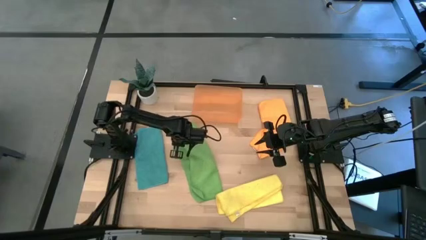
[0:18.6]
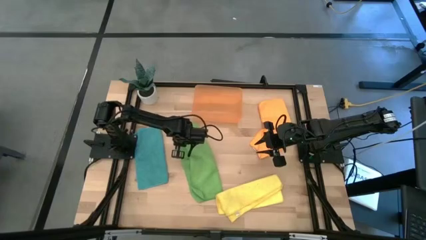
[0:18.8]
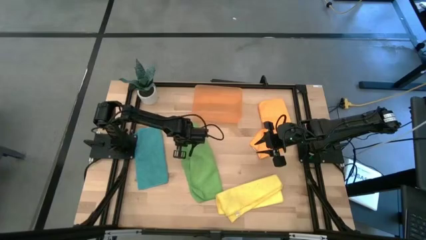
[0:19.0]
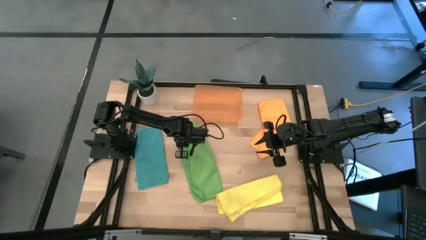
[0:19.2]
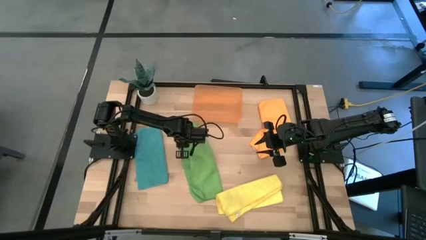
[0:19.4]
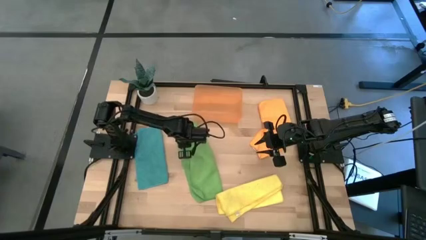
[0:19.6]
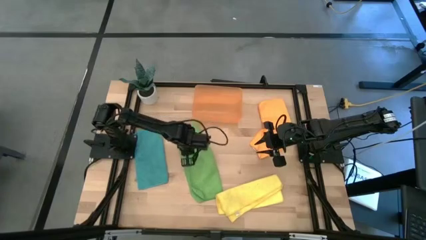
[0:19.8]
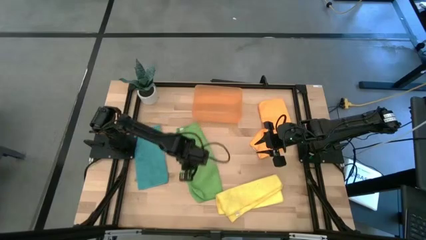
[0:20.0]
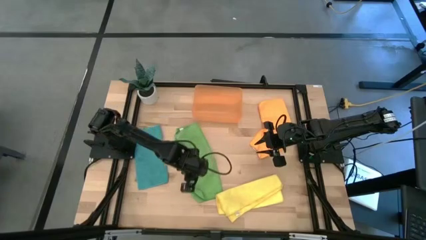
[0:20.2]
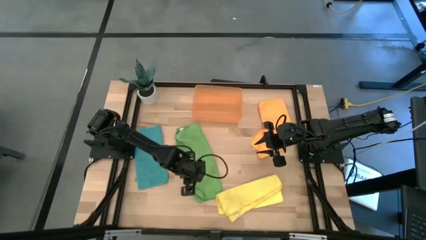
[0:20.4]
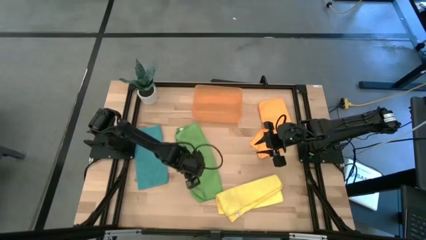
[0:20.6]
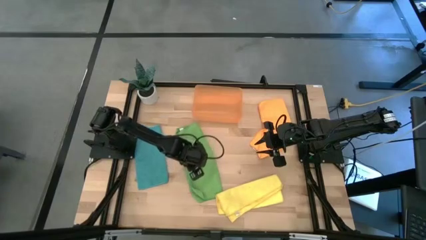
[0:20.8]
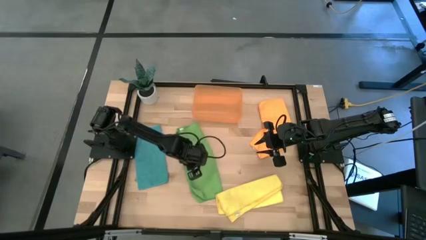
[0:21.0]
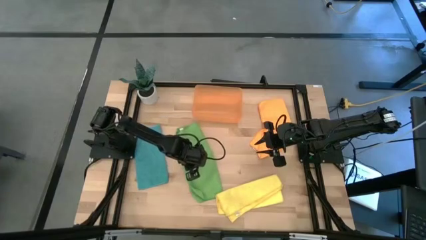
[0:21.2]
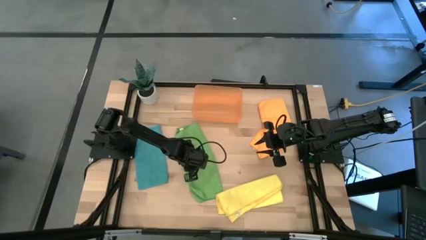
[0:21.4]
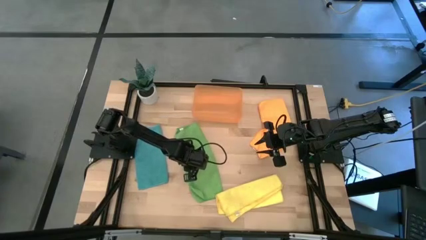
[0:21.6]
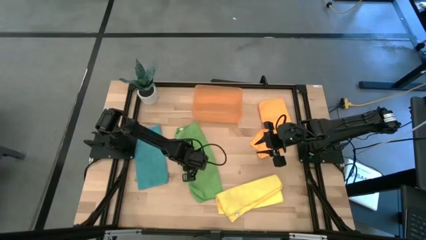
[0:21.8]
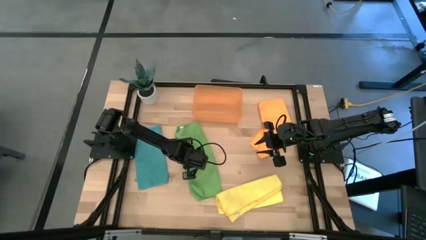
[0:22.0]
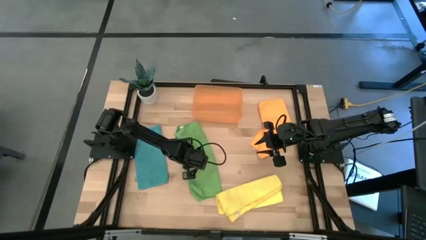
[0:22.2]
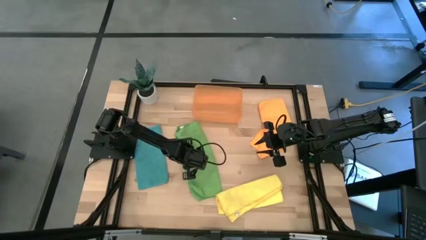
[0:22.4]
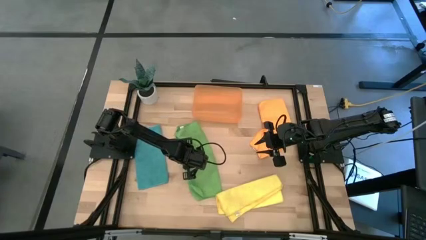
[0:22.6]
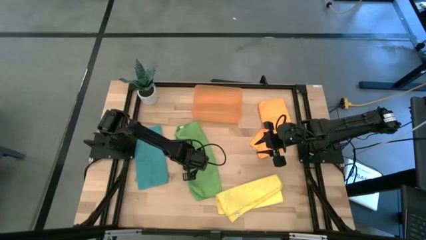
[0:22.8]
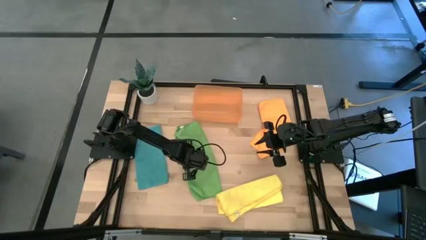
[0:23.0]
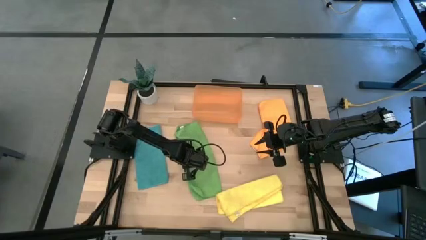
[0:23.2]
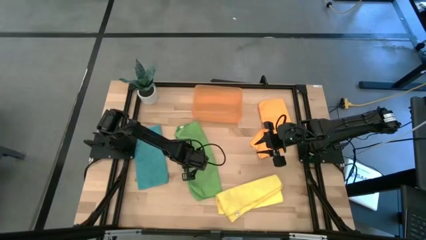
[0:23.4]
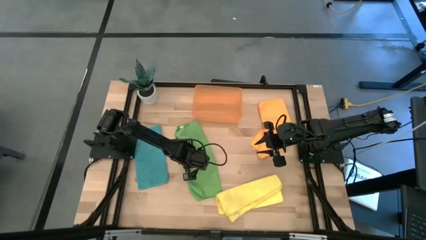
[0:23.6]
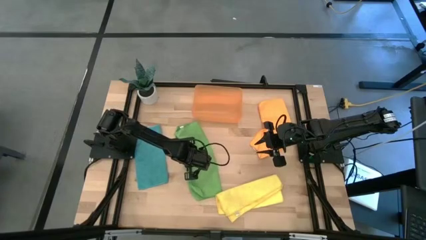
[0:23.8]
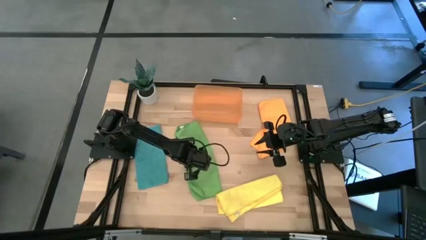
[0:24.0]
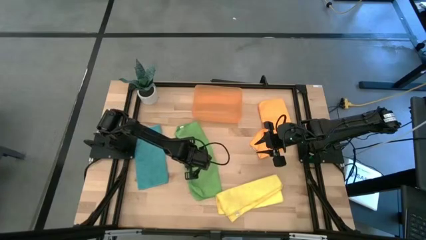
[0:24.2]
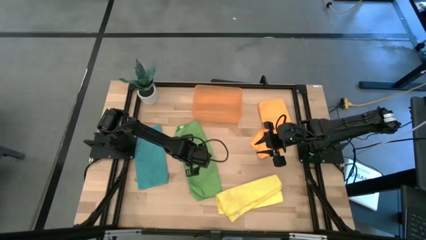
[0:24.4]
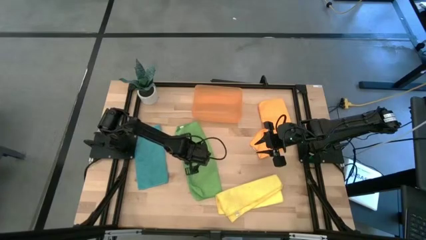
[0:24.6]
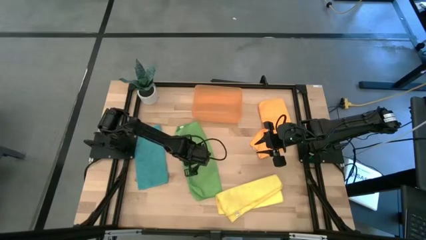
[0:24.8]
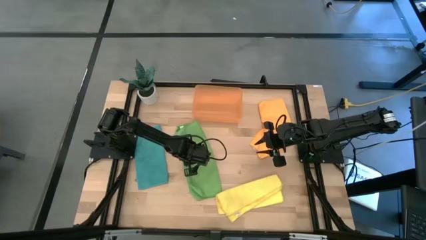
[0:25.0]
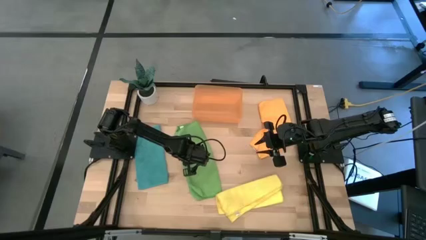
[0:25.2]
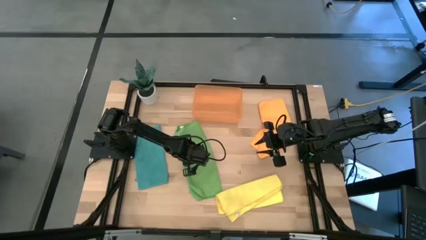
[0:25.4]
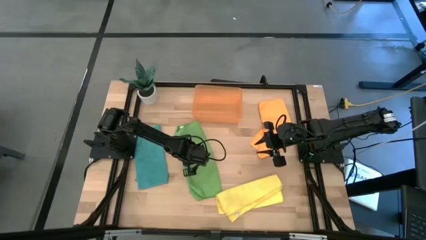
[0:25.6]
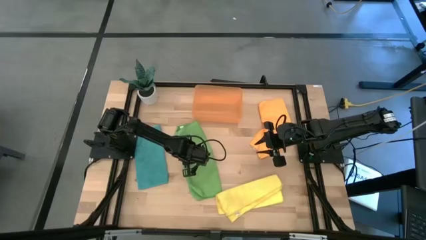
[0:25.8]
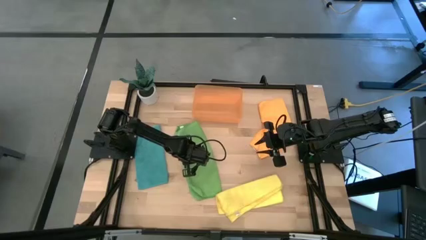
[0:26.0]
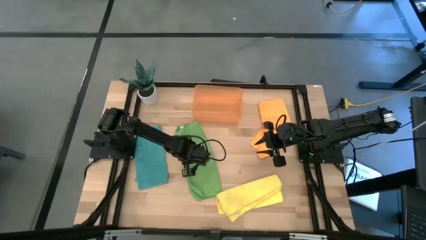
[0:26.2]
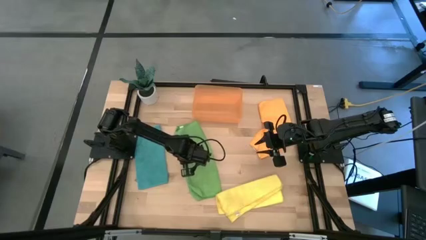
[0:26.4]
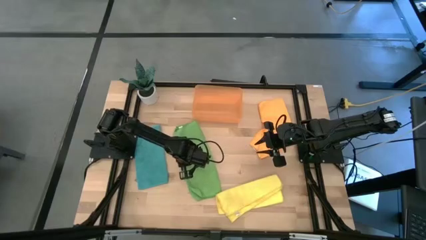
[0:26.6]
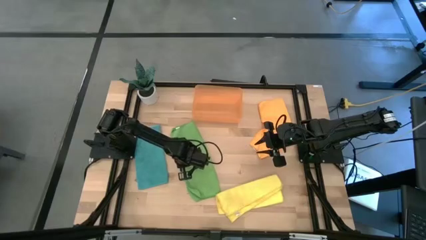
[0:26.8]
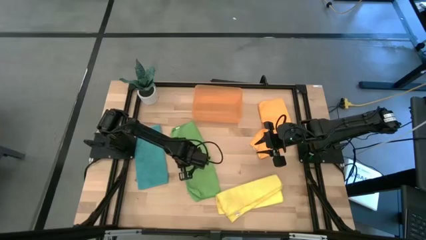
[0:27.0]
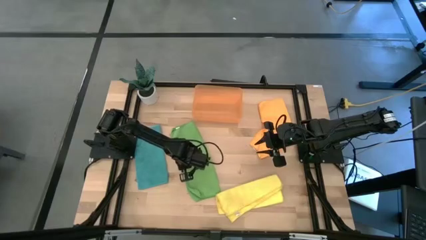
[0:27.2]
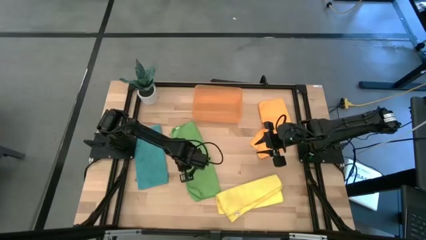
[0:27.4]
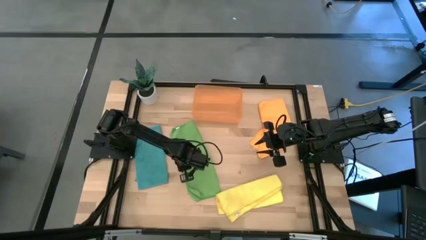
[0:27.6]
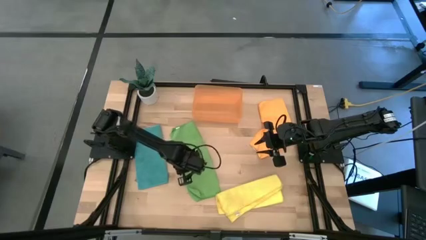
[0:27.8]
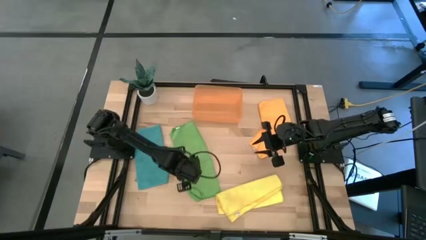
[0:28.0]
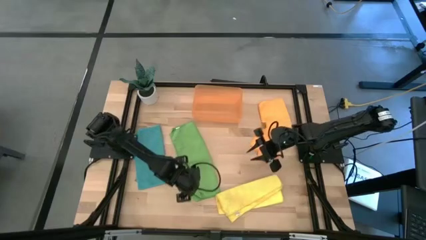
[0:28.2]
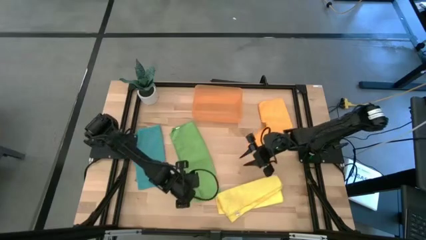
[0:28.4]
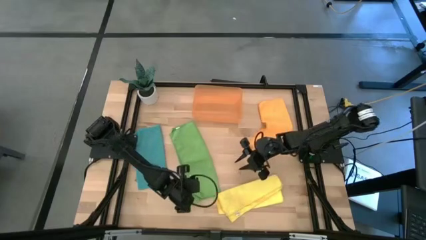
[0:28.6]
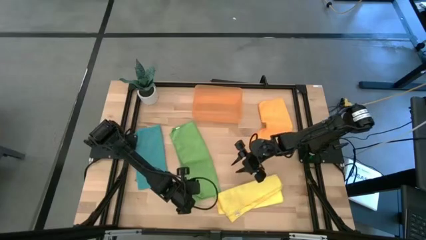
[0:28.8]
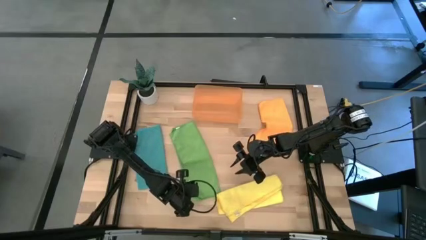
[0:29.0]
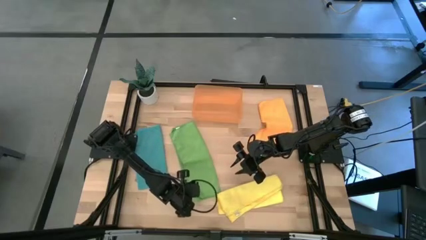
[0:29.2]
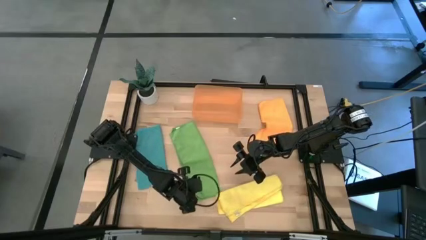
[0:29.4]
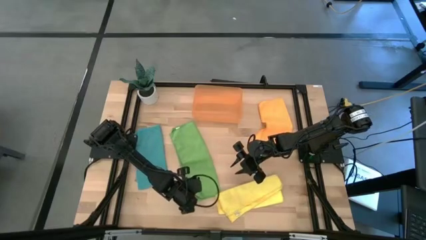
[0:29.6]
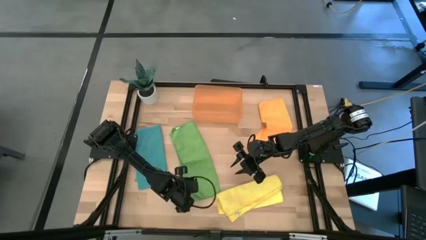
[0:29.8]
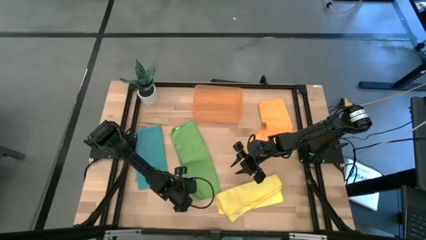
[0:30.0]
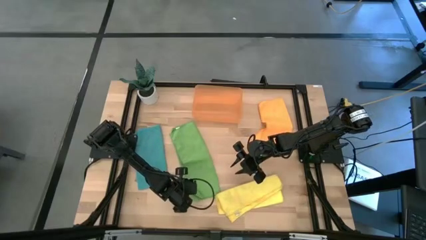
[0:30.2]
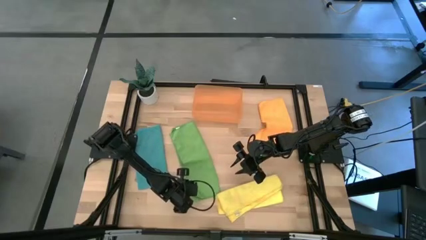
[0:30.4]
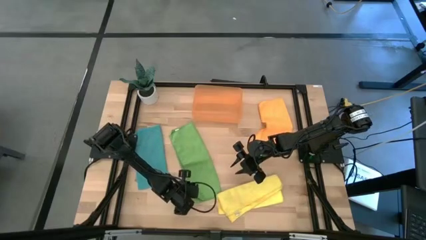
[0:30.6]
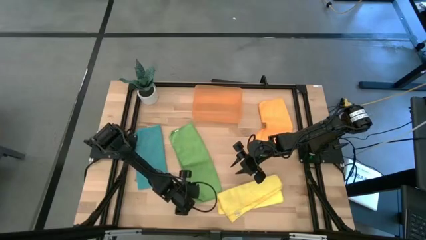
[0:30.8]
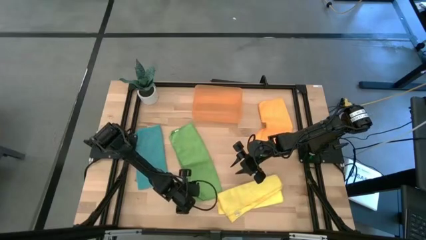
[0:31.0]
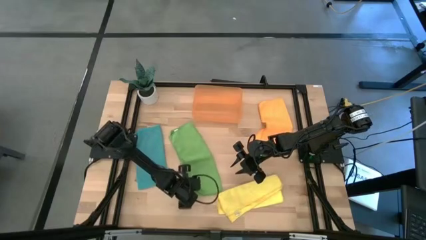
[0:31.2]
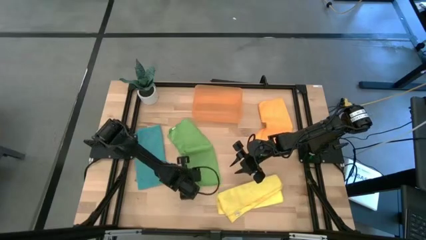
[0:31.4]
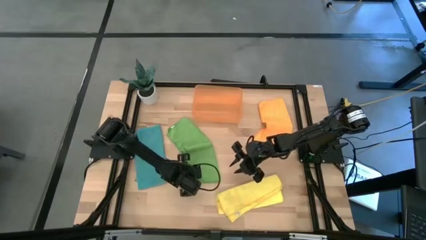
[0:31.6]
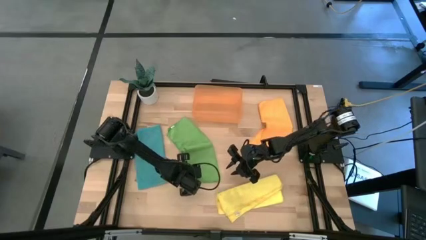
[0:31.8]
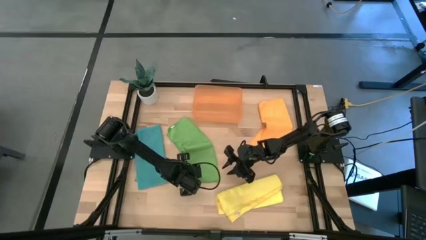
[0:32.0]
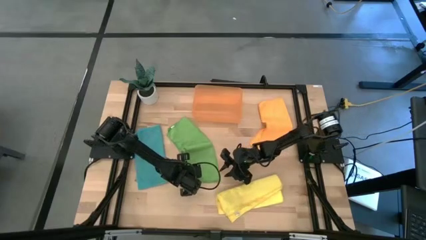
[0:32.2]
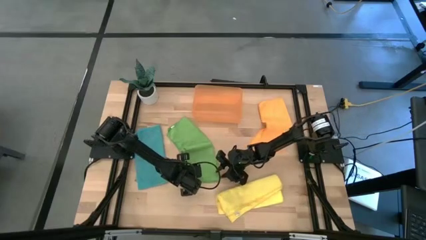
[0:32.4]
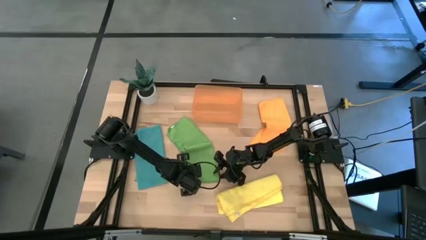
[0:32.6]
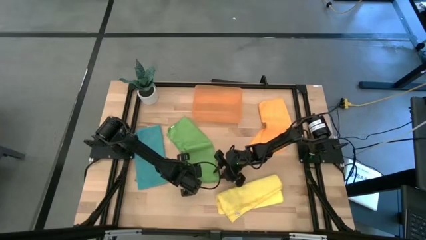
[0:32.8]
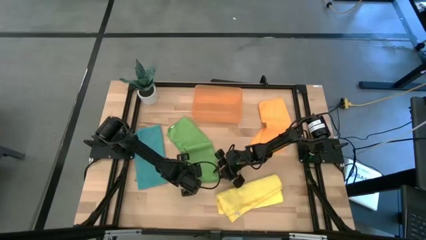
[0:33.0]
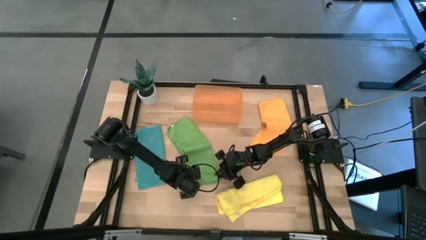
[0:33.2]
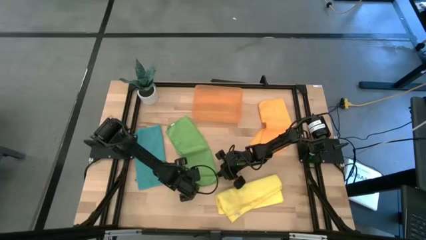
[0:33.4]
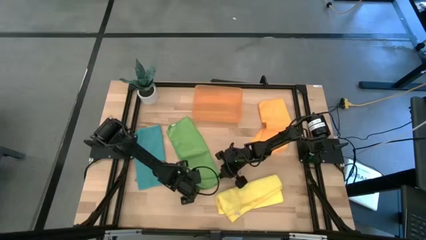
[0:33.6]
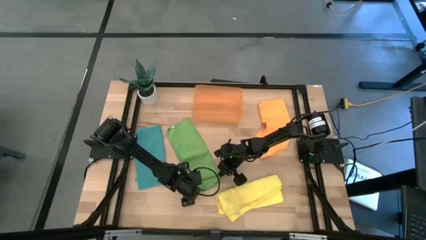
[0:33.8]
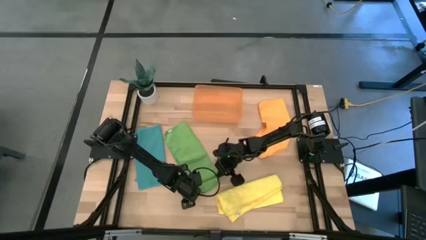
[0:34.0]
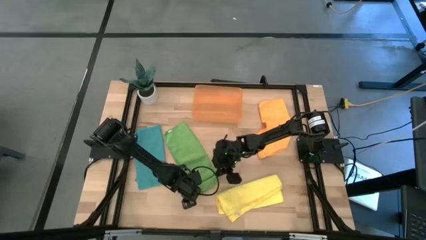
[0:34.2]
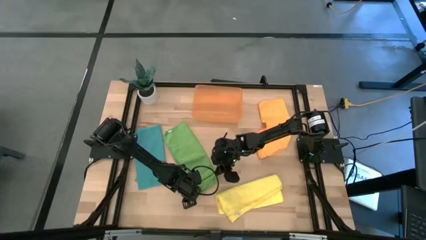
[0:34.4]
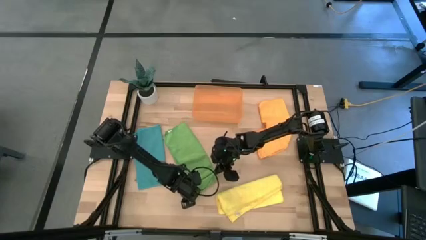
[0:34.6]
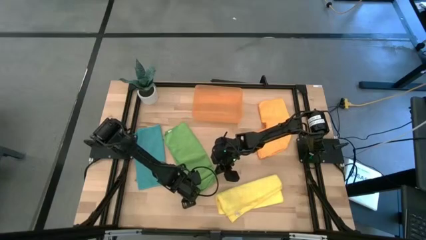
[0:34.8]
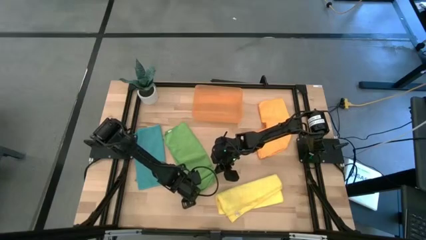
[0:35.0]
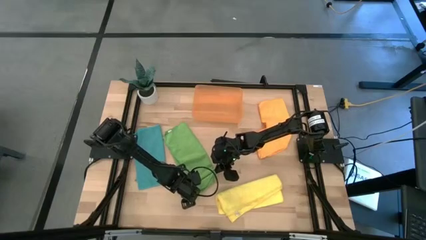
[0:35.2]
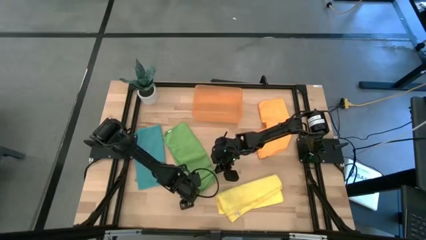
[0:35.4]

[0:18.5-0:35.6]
Task: Roll microfiber towels into tight, uniform cylinder then place into a basket
Roll the green microfiber cloth
